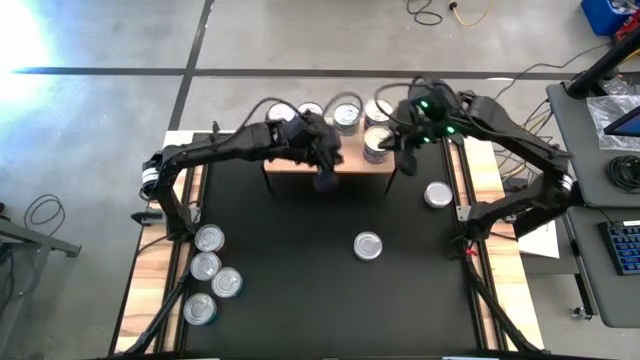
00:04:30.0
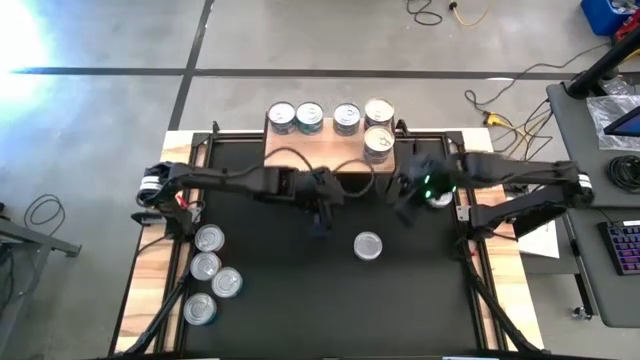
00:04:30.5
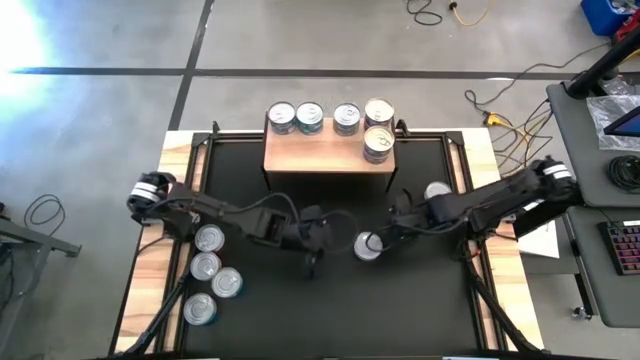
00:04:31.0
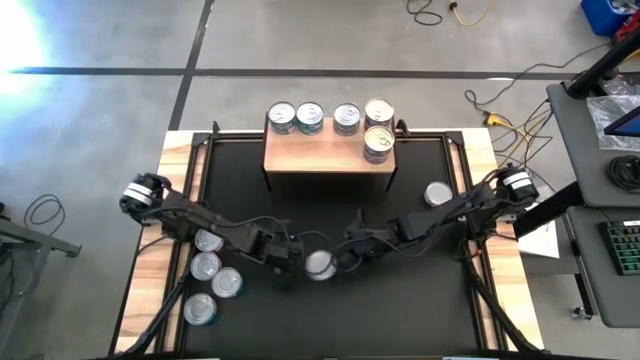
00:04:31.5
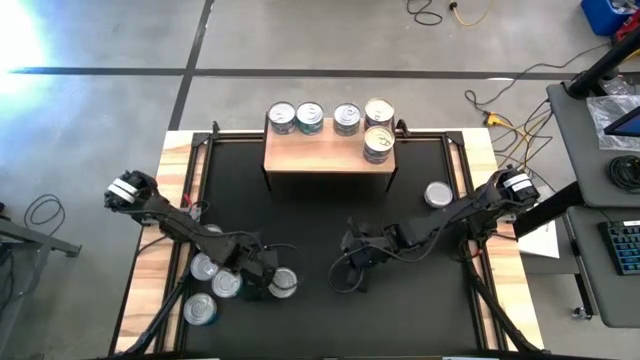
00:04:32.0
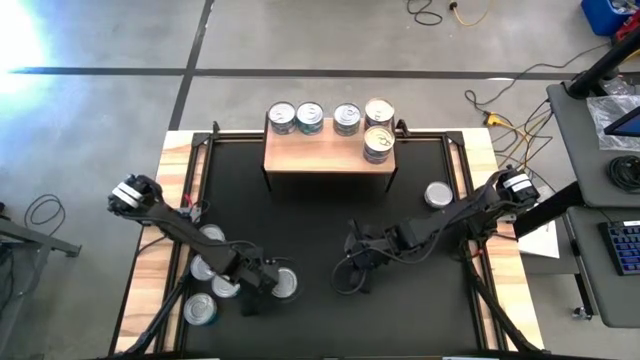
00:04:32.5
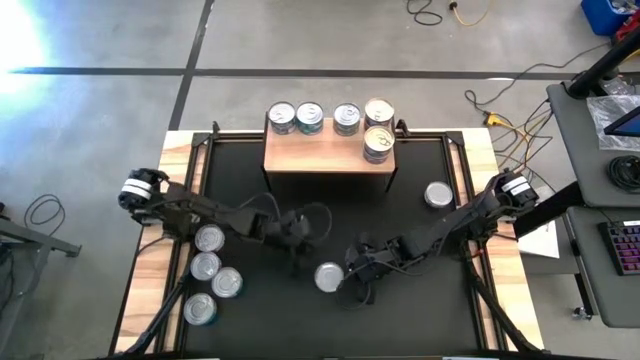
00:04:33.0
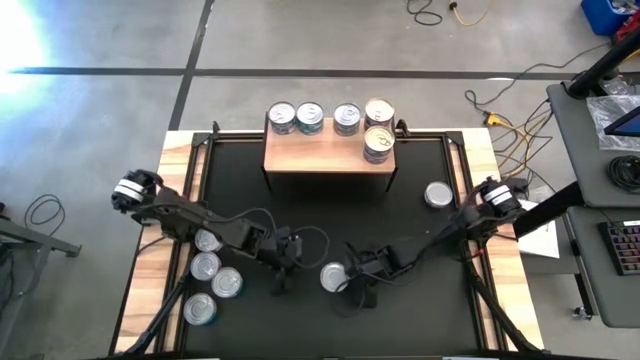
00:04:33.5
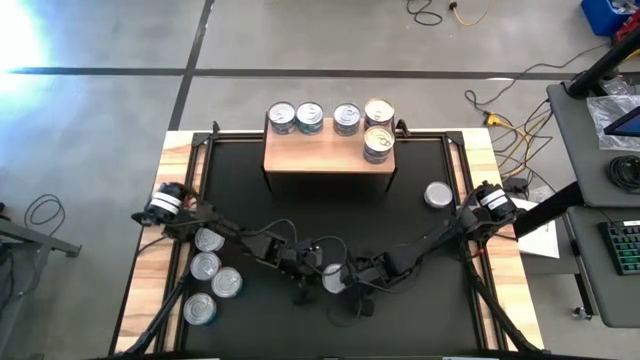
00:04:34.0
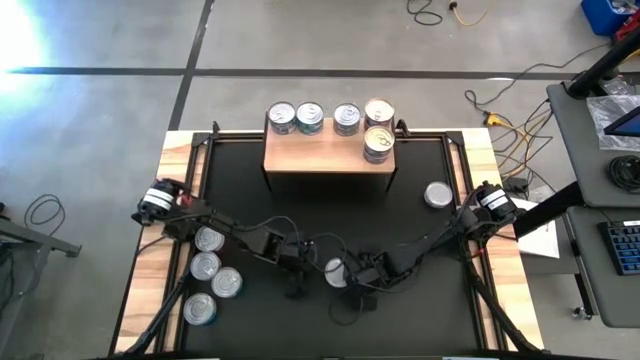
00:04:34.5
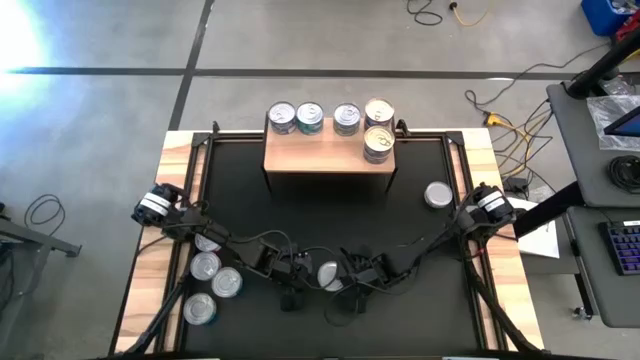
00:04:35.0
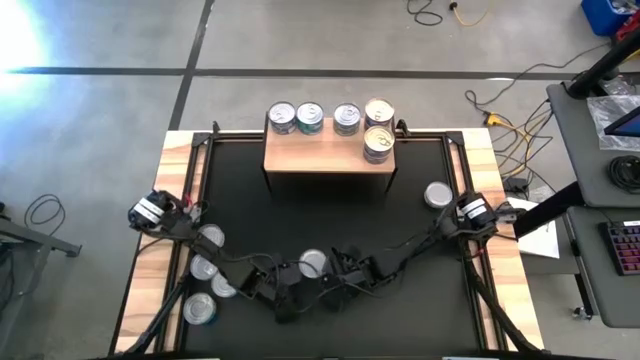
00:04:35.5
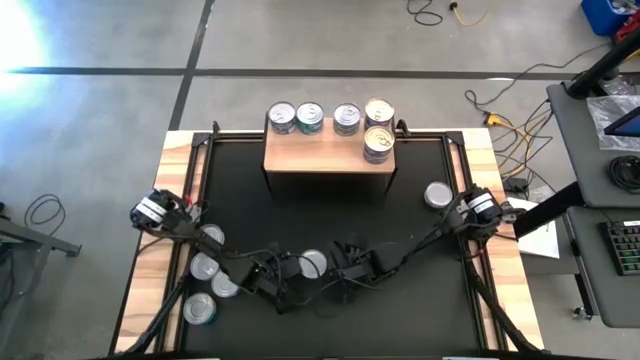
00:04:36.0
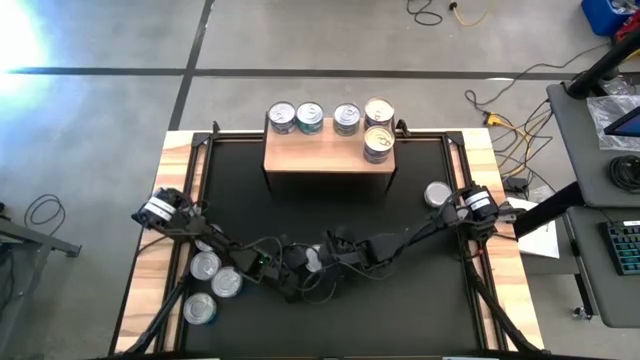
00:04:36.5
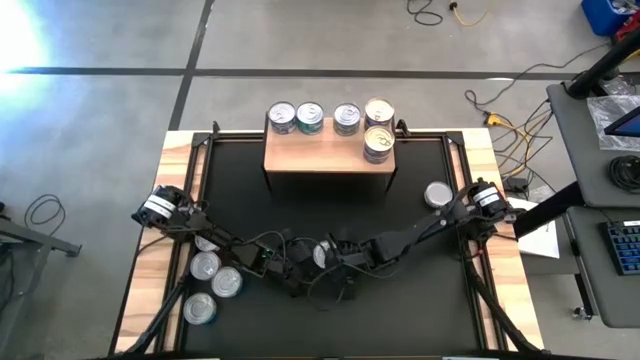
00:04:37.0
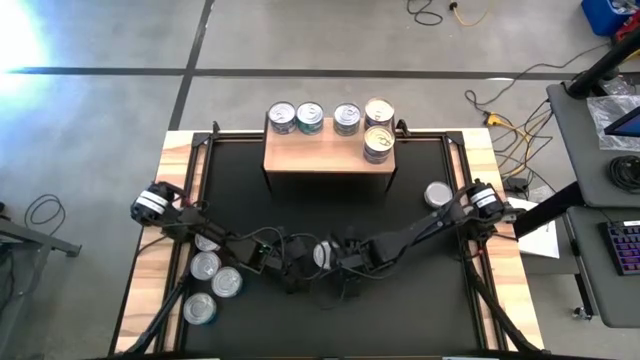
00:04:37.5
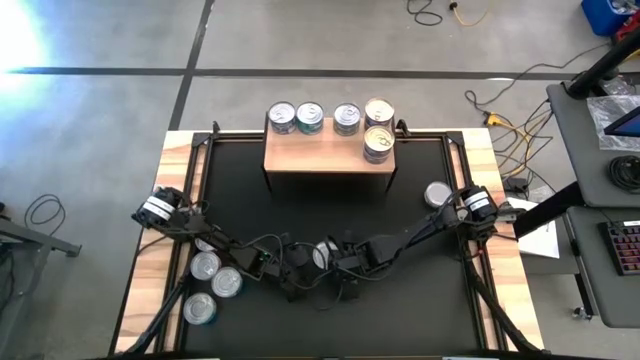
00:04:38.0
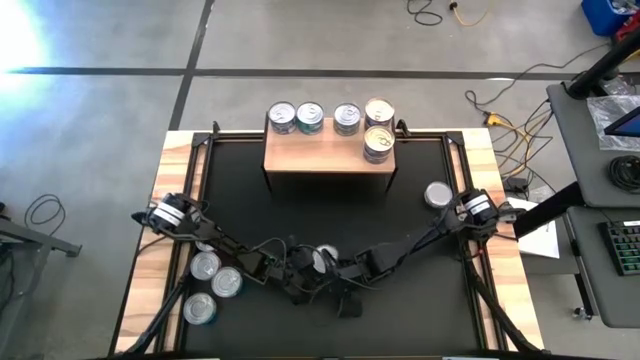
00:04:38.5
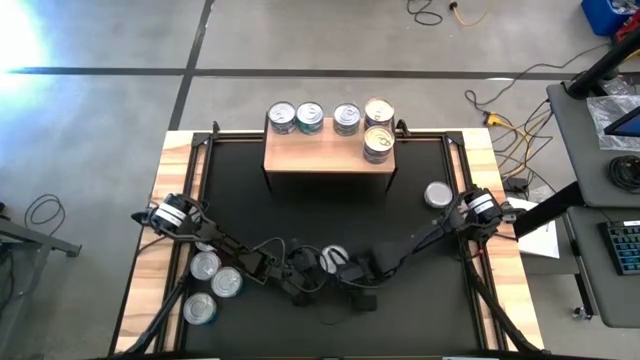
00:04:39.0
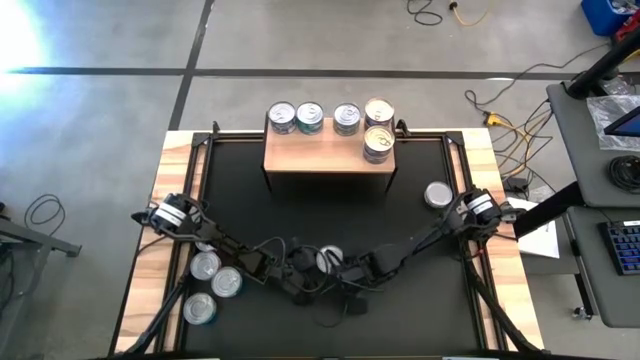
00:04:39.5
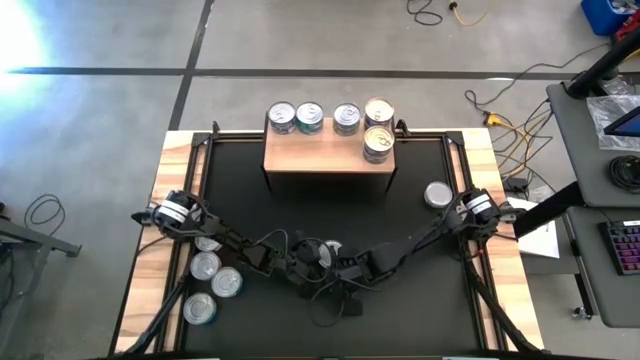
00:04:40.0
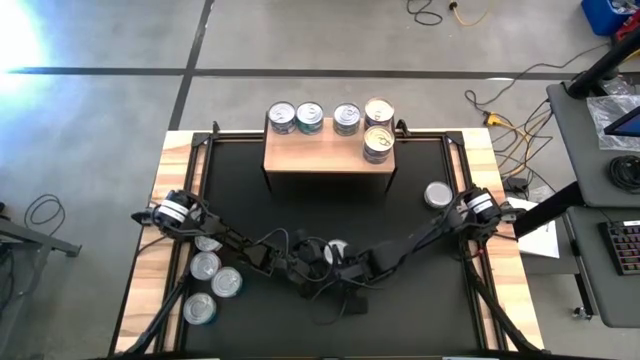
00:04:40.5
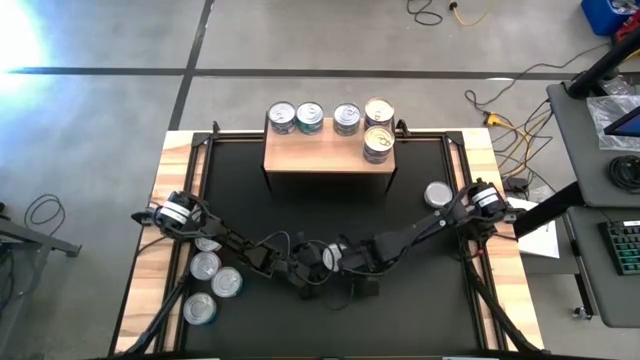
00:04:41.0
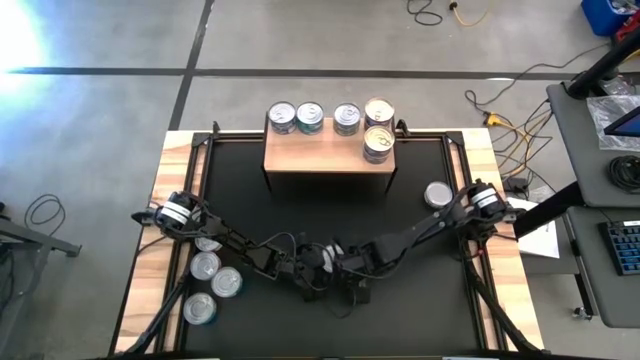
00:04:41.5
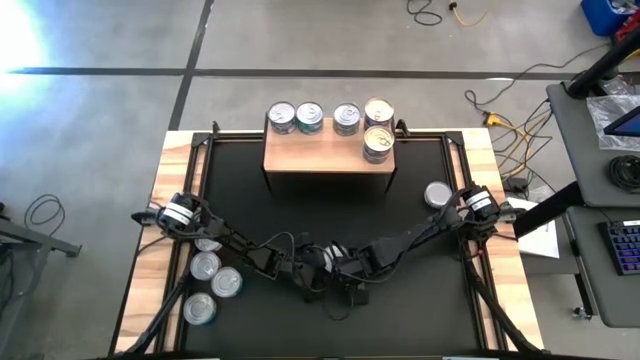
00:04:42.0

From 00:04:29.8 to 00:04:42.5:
Task: Stack canned seafood by type on shelf
Put the bottom green tuna can on the shelf

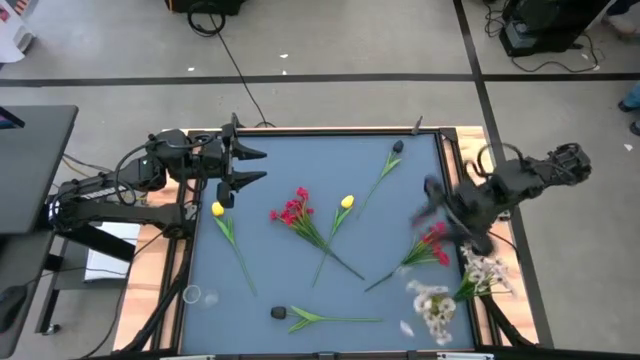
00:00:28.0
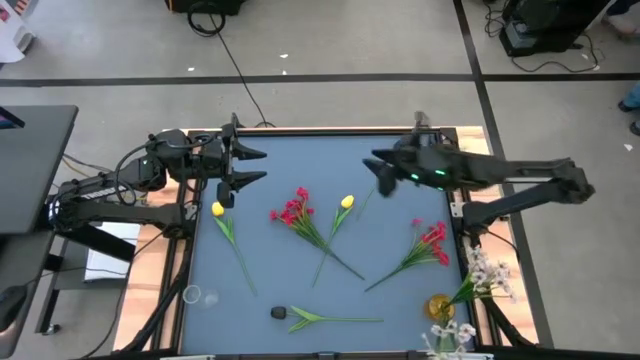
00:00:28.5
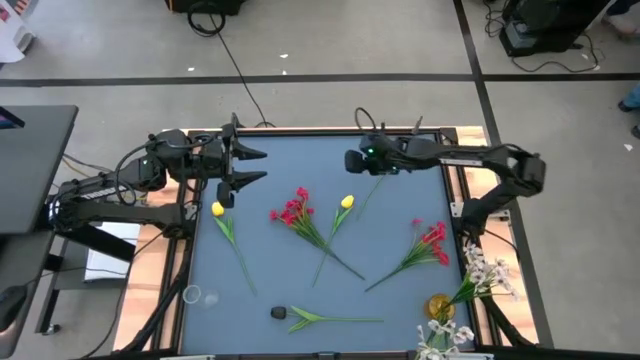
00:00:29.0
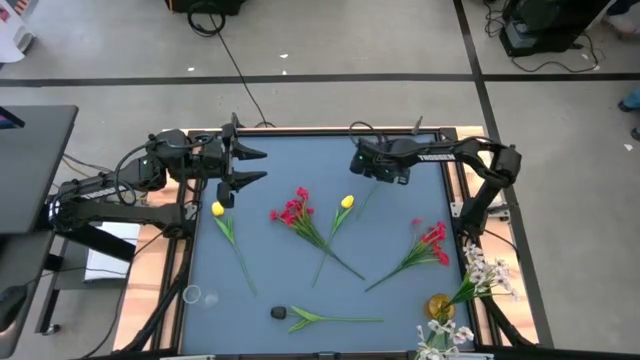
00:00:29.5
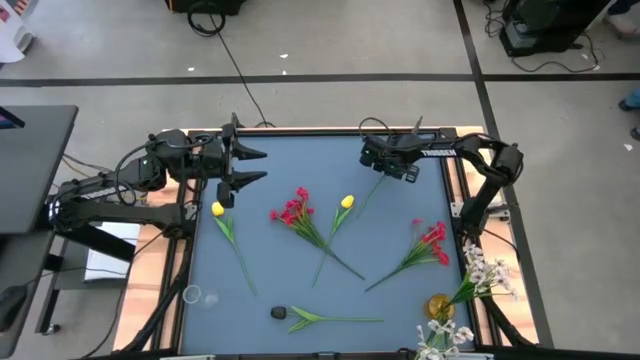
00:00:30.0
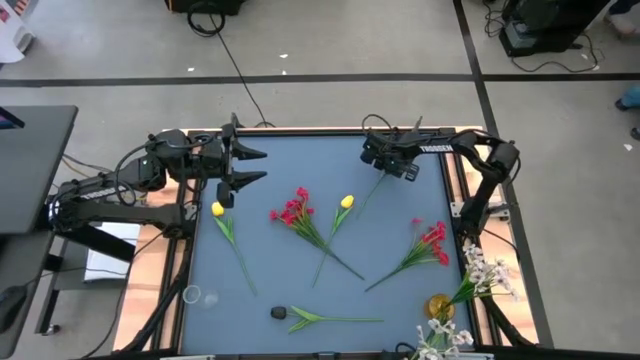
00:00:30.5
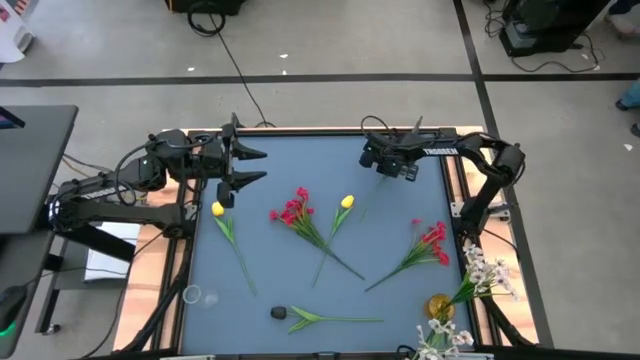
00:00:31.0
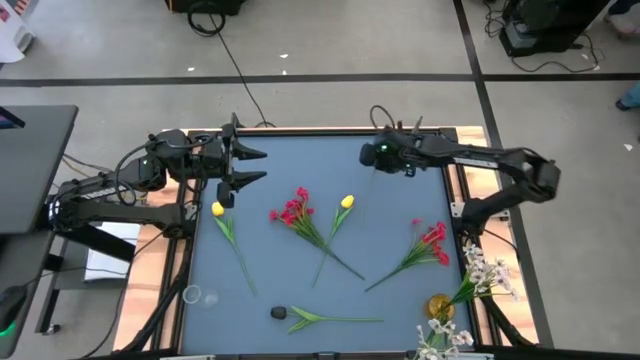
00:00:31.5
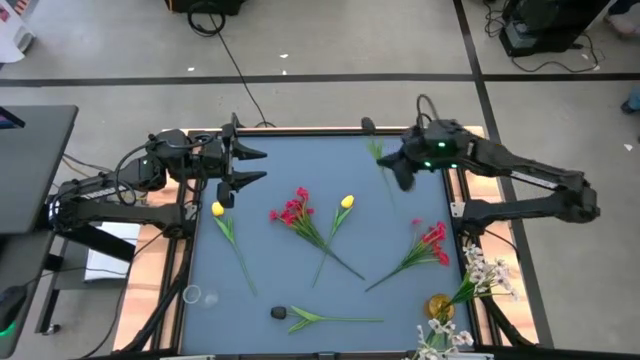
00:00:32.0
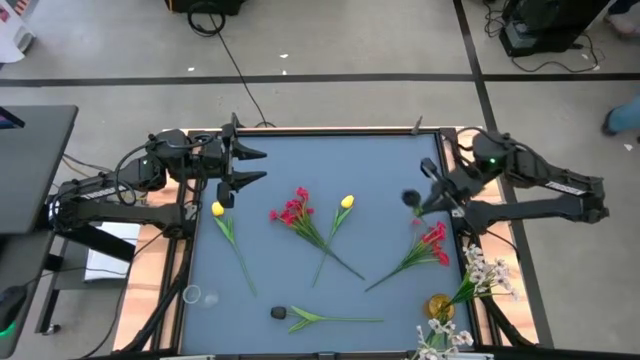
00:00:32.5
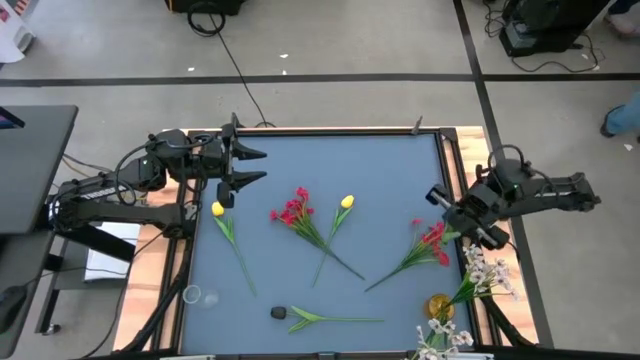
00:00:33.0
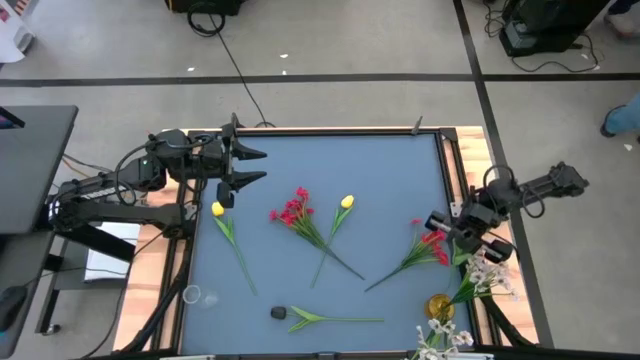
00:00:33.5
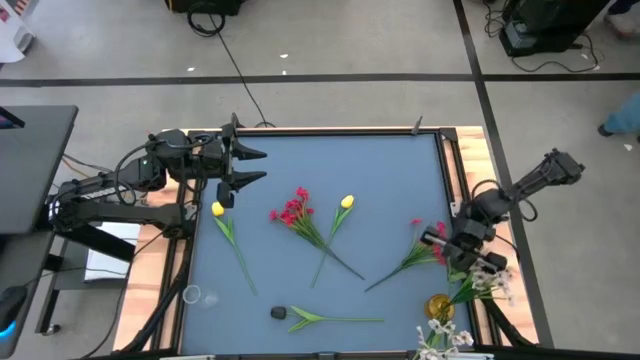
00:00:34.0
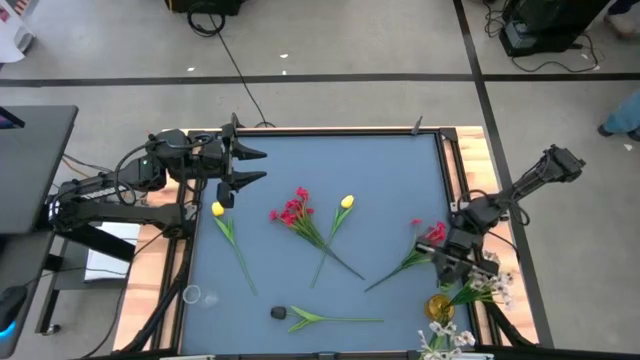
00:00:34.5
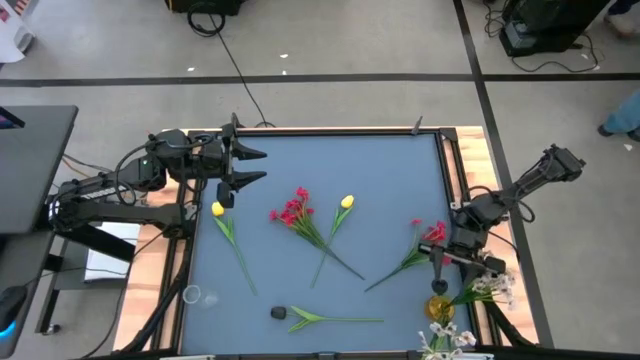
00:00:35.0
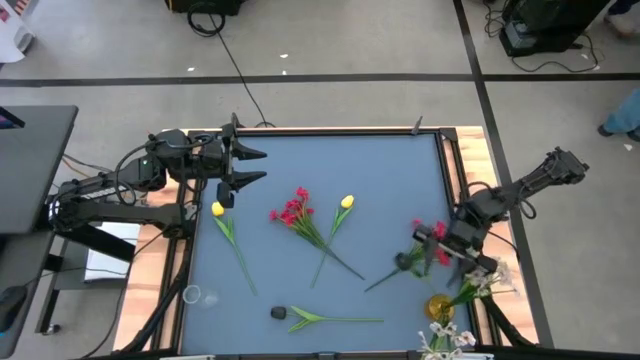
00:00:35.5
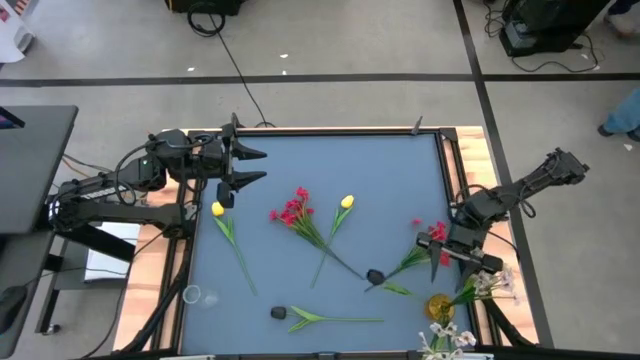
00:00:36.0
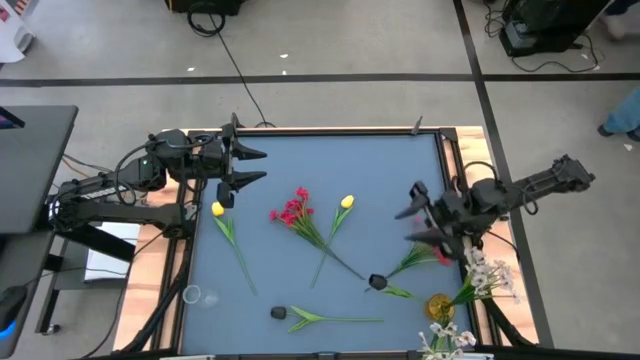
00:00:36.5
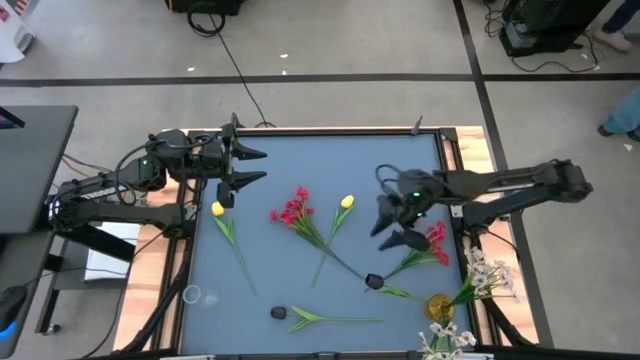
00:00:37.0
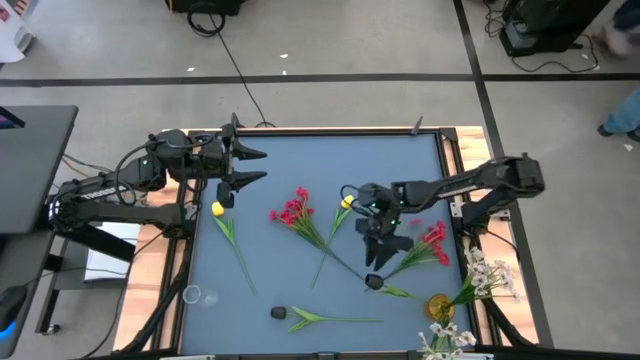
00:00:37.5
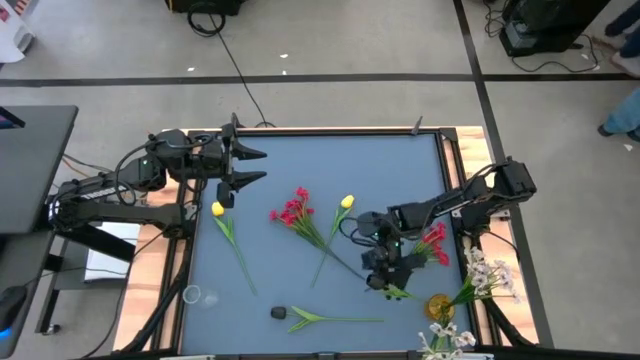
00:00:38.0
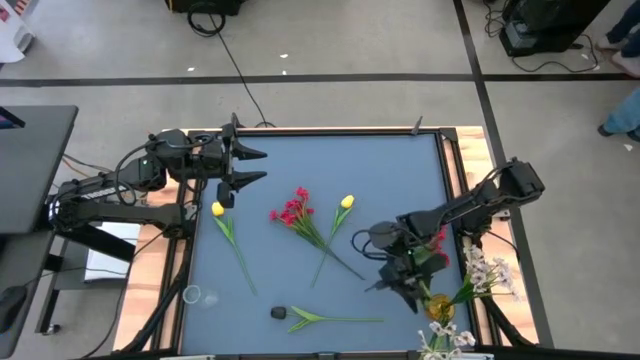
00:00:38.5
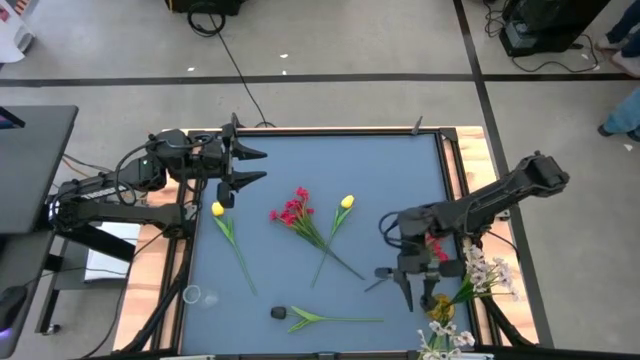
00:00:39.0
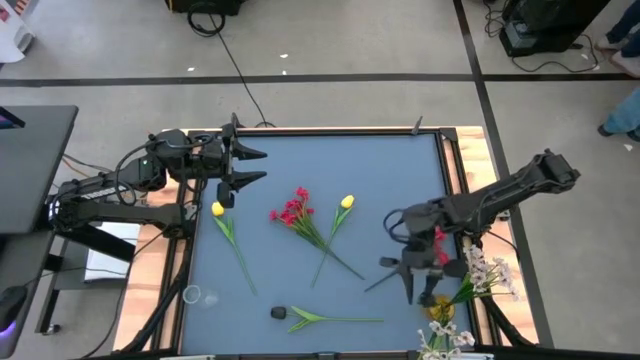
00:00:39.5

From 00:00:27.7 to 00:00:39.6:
Task: Sort flowers into vase by color
Put the top black flower into the yellow flower vase
